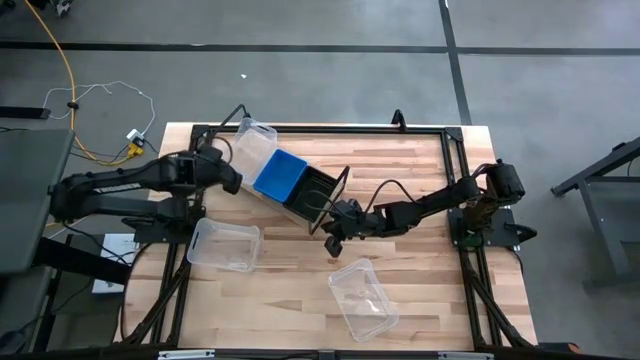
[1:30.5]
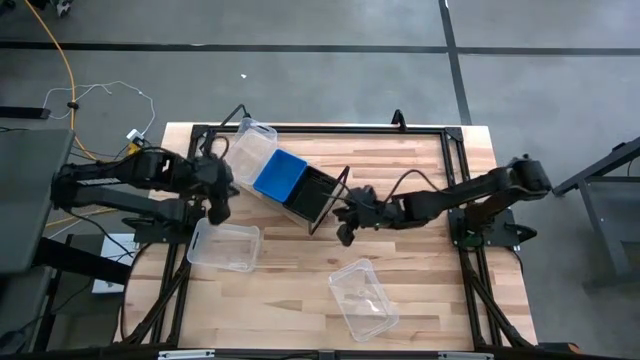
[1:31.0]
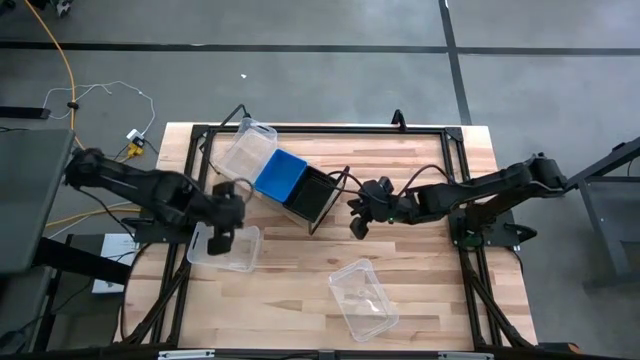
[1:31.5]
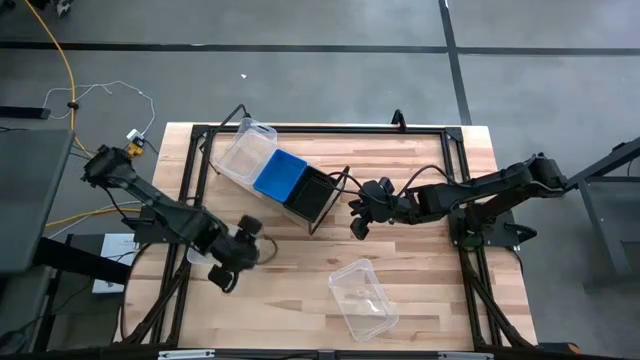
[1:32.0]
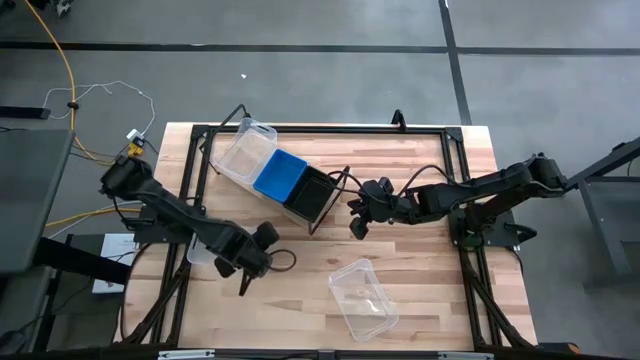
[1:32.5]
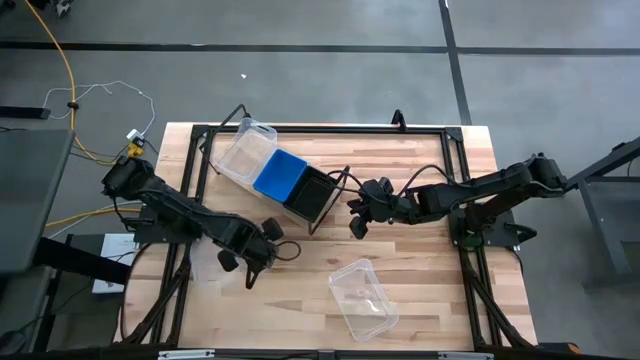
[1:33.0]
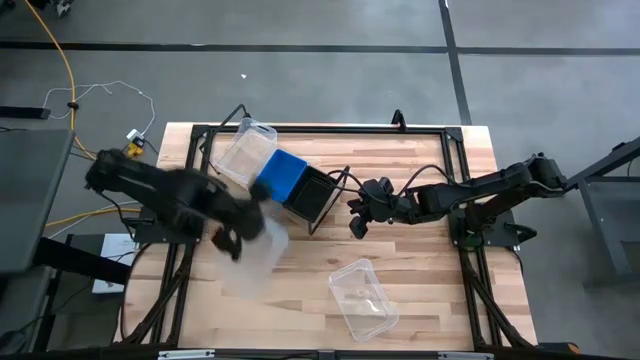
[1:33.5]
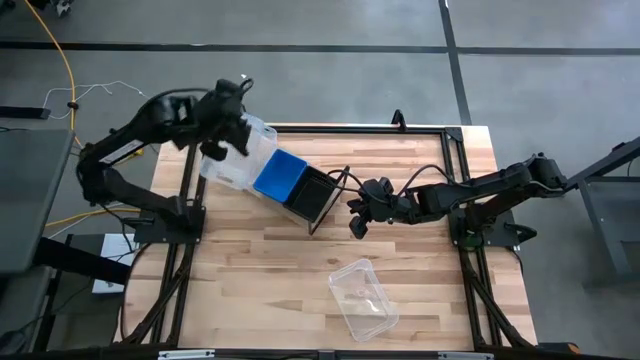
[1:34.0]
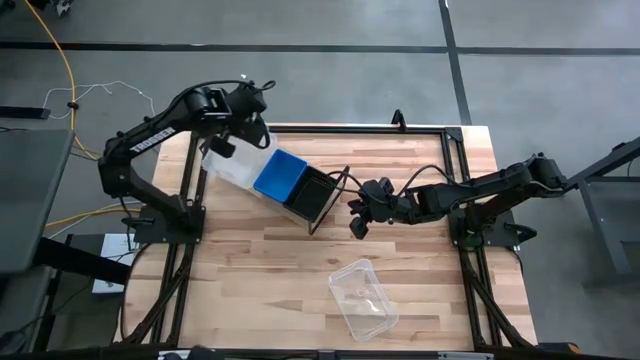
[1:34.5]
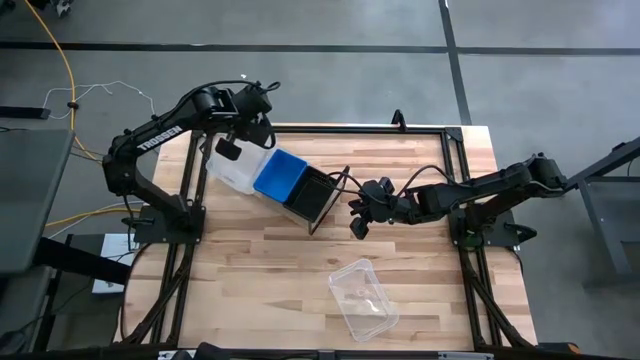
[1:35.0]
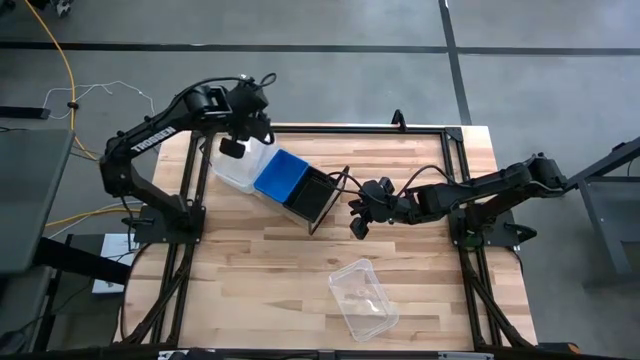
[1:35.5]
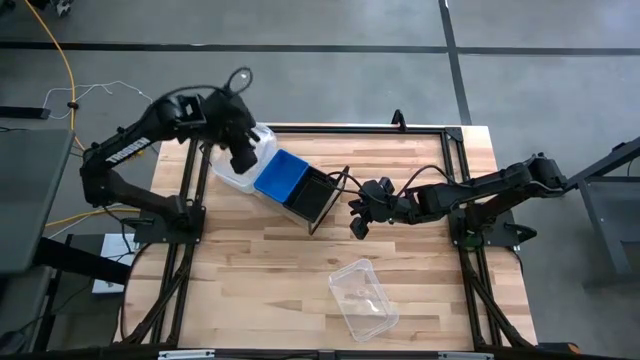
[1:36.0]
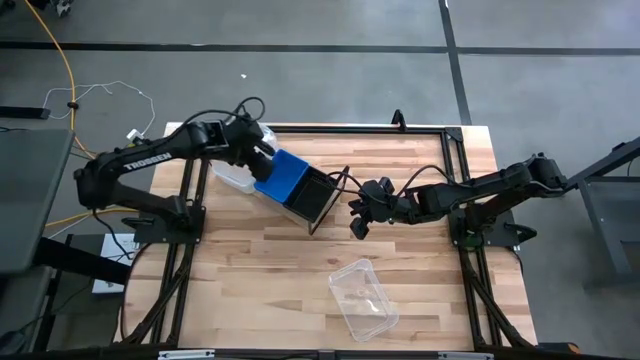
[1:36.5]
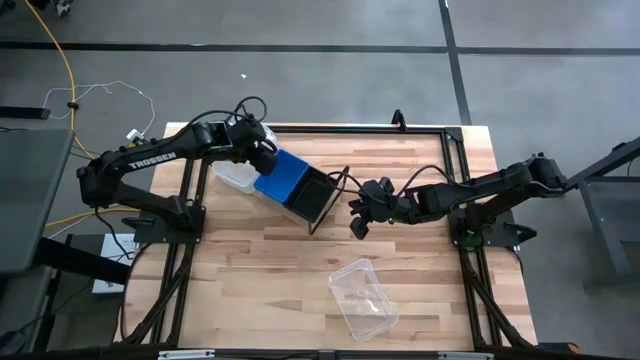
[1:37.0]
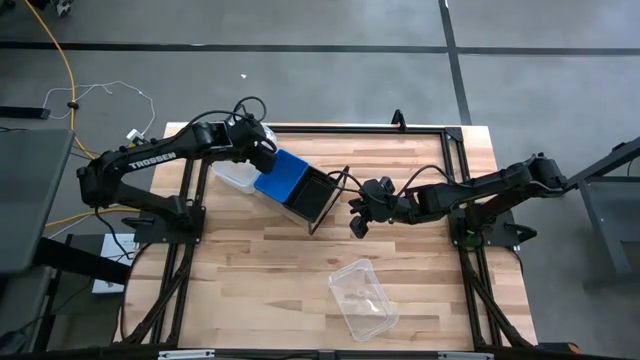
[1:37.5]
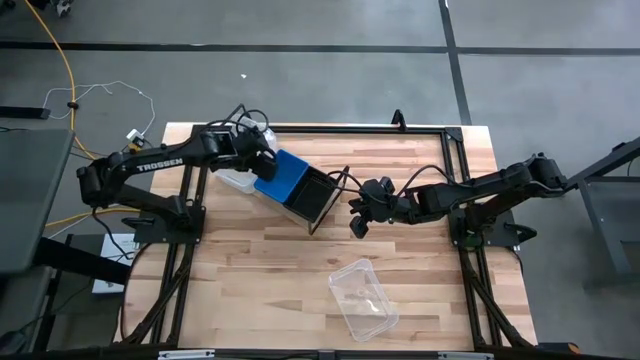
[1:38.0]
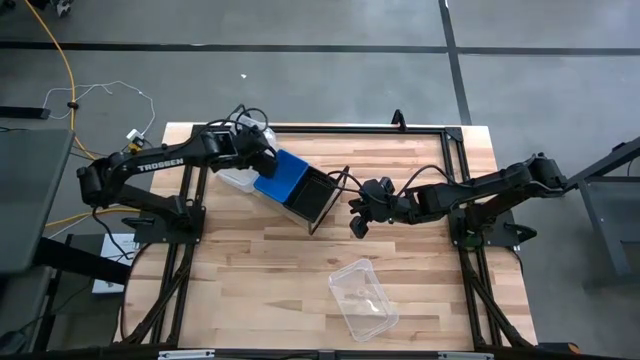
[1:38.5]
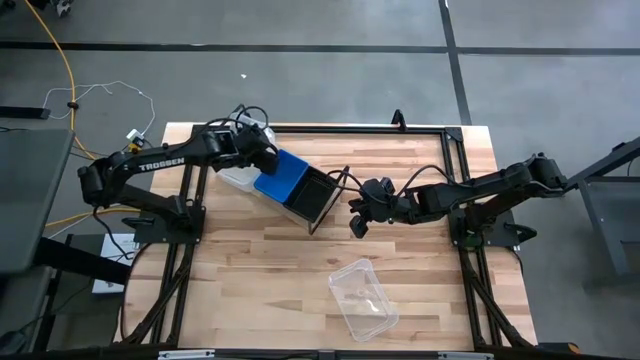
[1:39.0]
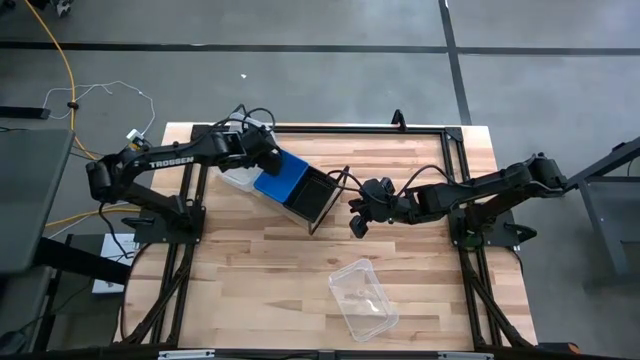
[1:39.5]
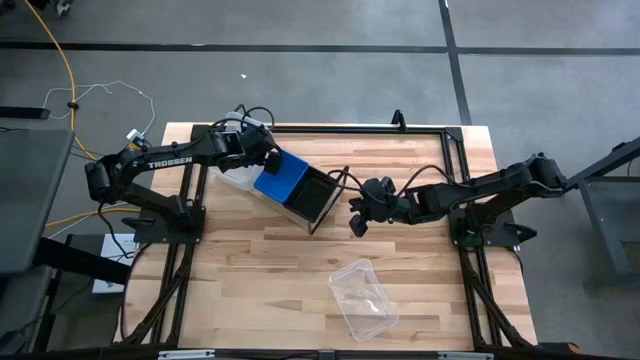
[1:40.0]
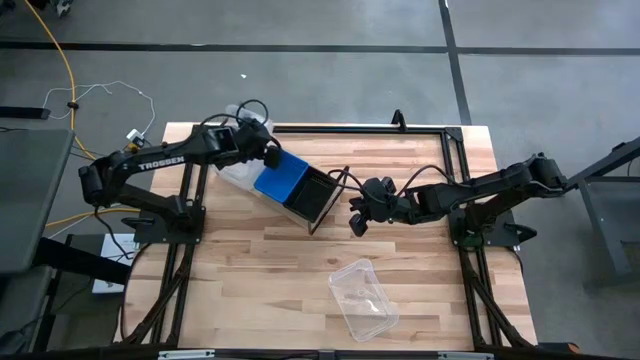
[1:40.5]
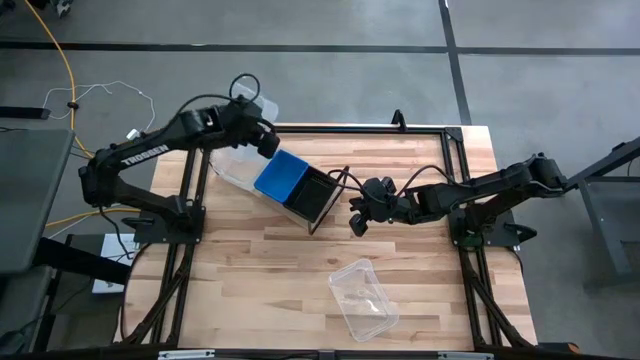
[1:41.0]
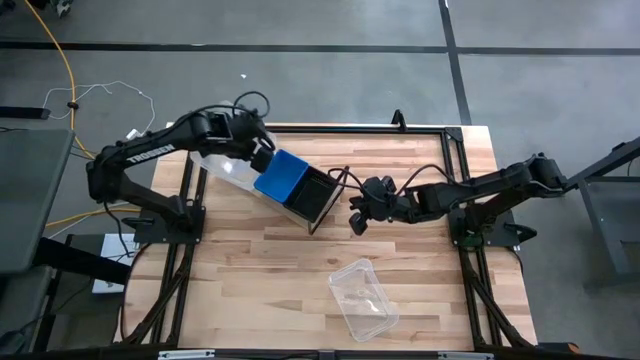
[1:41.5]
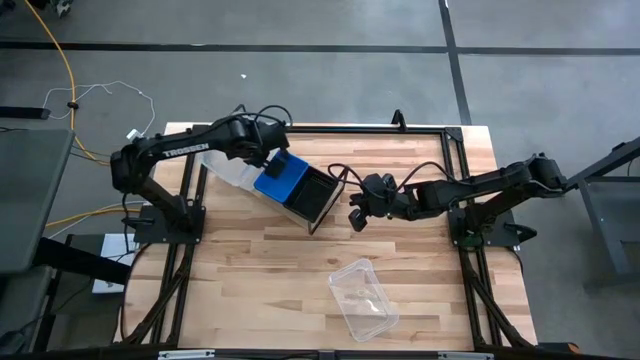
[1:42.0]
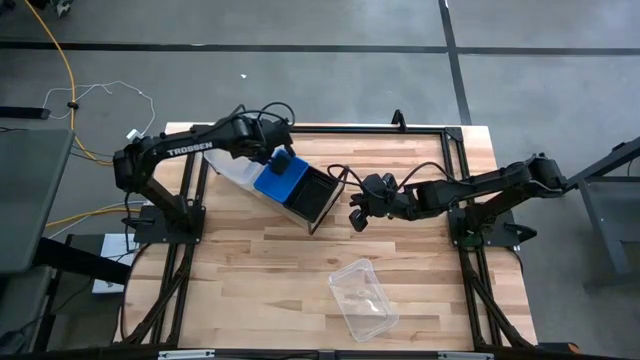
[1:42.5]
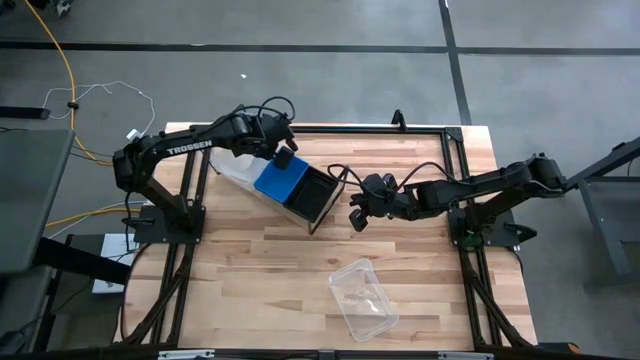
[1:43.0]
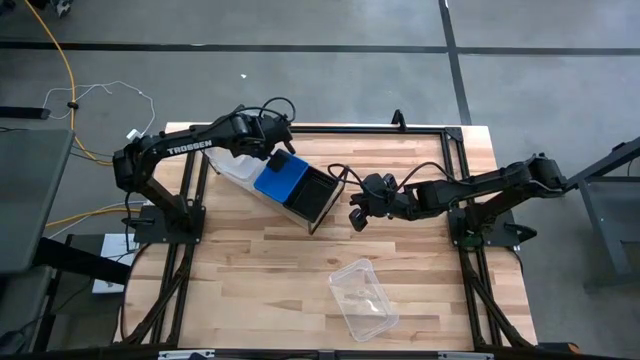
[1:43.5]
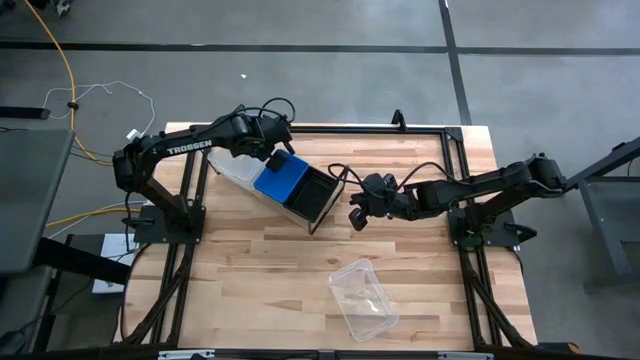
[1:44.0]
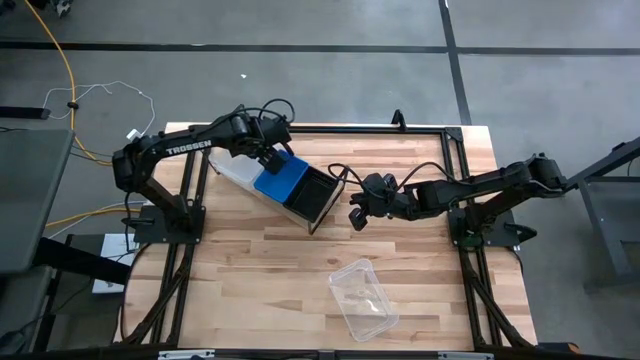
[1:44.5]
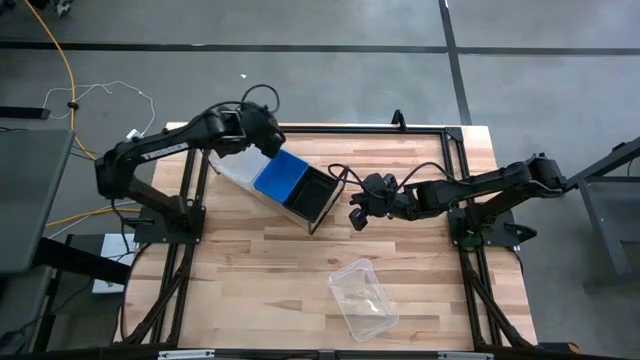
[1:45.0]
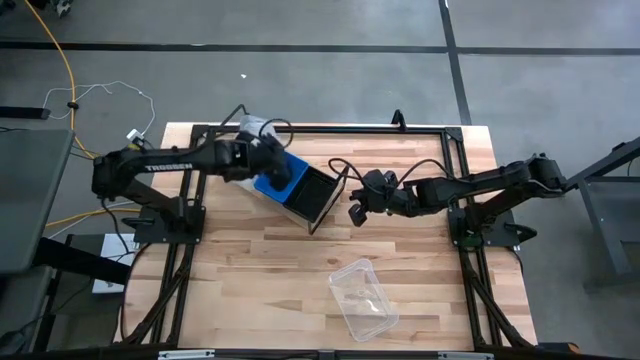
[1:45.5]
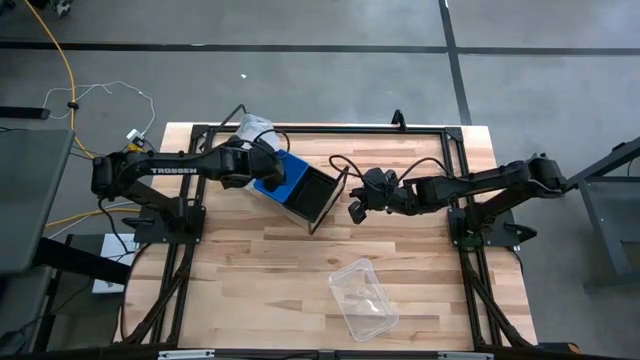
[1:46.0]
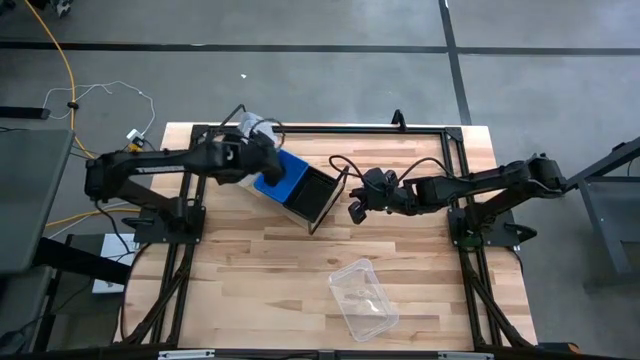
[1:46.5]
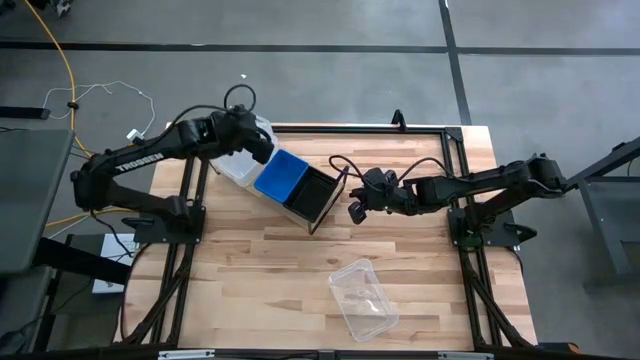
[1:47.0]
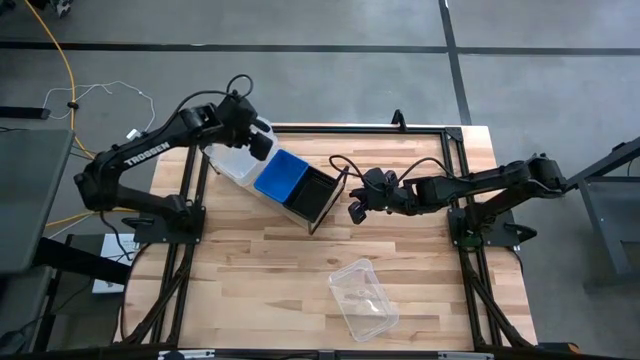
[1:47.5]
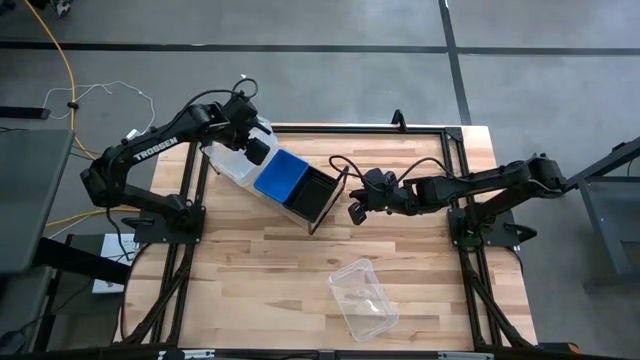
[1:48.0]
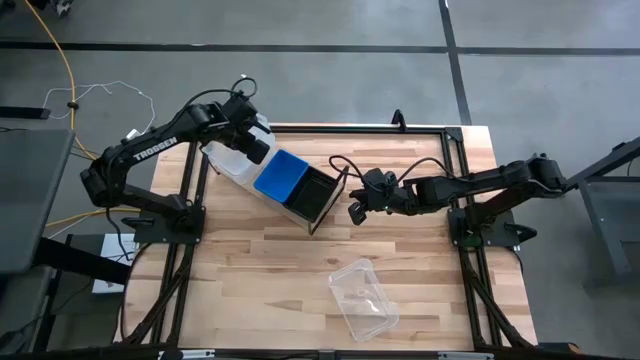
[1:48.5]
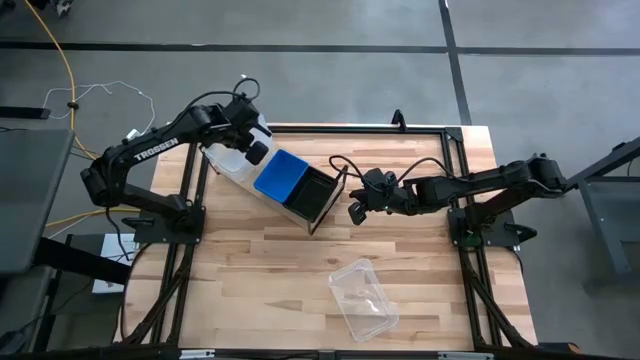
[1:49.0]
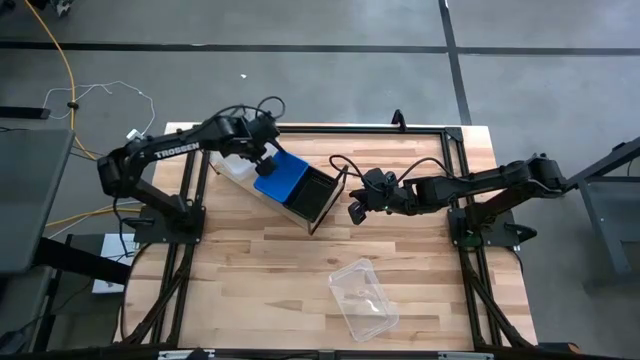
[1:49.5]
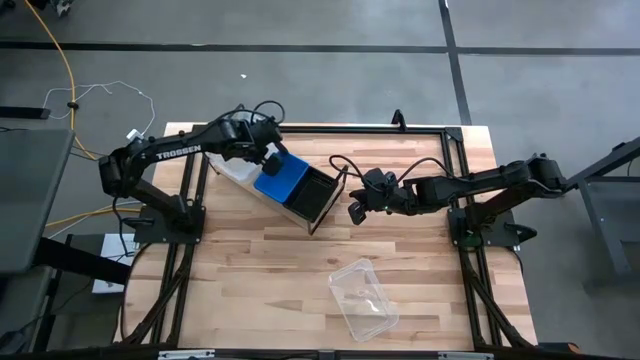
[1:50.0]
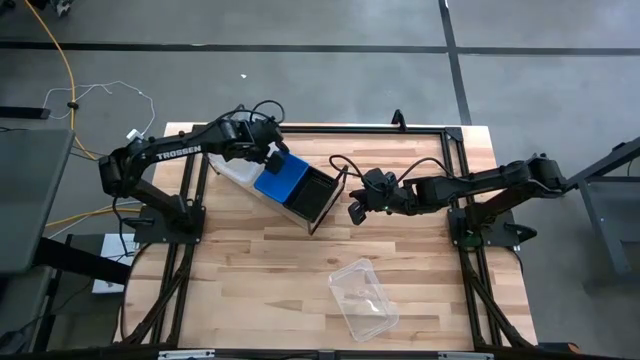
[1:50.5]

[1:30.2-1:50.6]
Task: Stack baskets on shelf by color
Stack the left transparent bin on top of the other transparent bin on the shelf

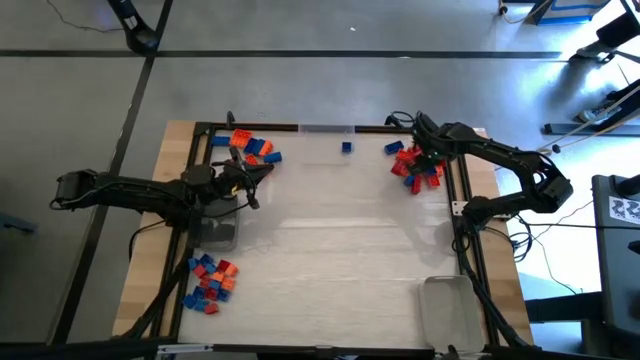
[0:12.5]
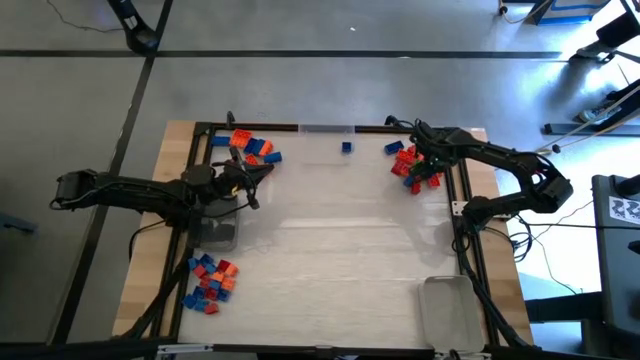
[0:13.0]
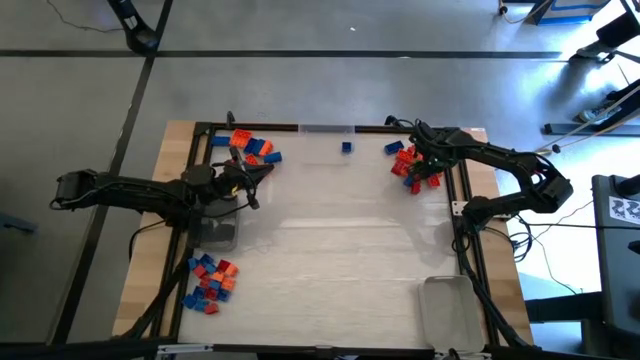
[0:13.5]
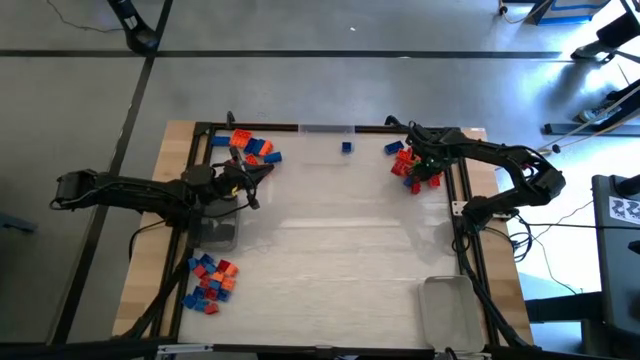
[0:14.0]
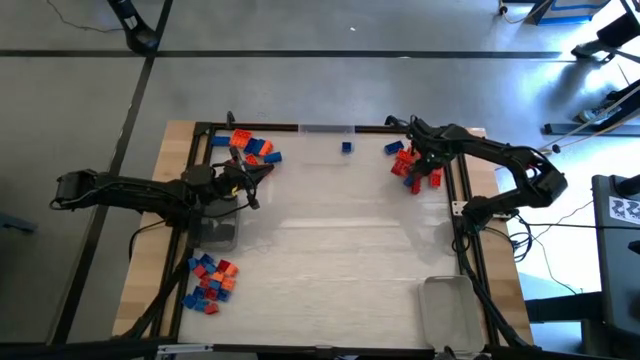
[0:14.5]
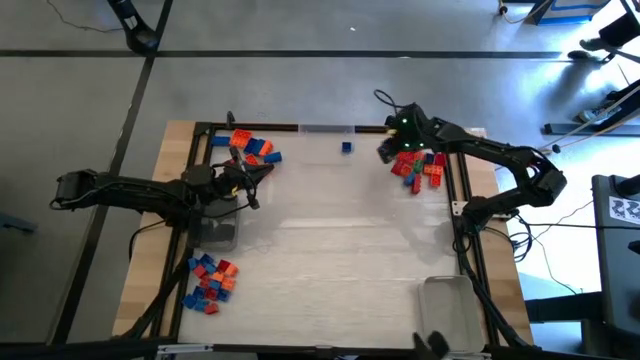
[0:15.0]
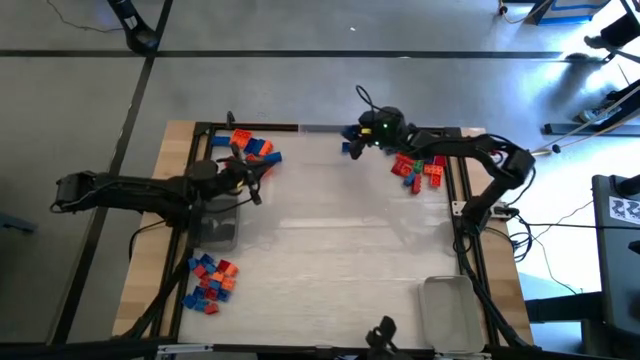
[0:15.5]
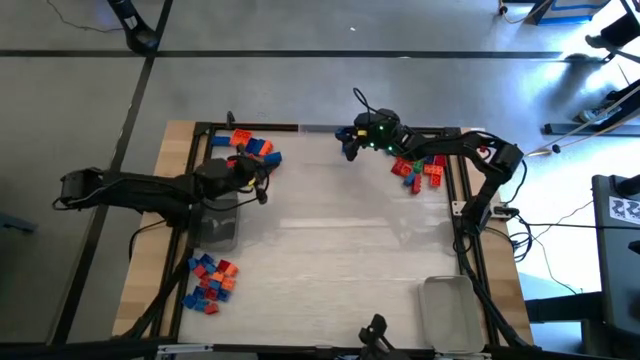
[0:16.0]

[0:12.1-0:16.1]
Task: Sort blocks by size
Put the blue 4 stud game piece into the transparent bin
